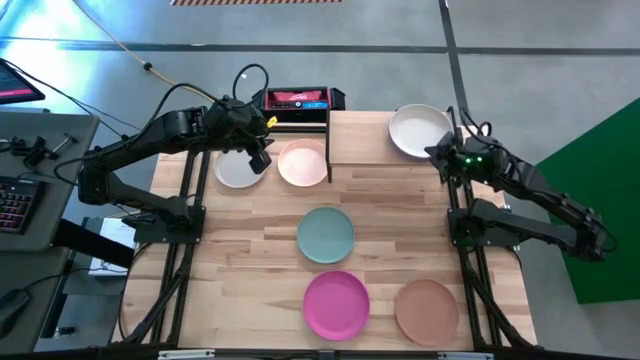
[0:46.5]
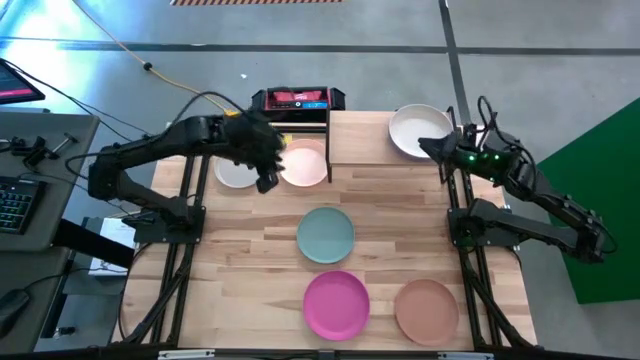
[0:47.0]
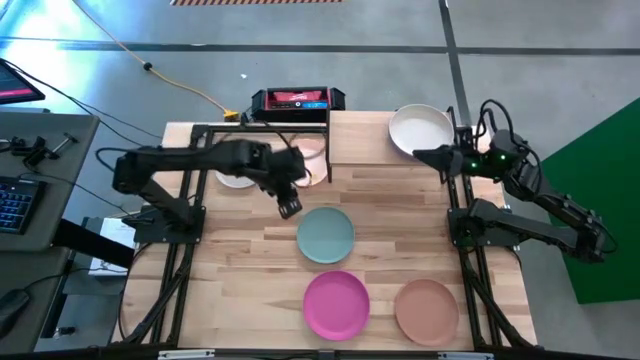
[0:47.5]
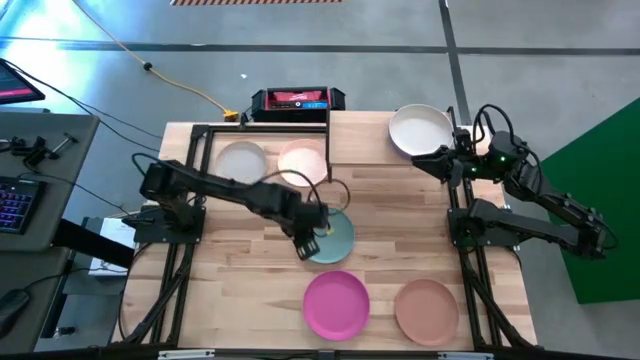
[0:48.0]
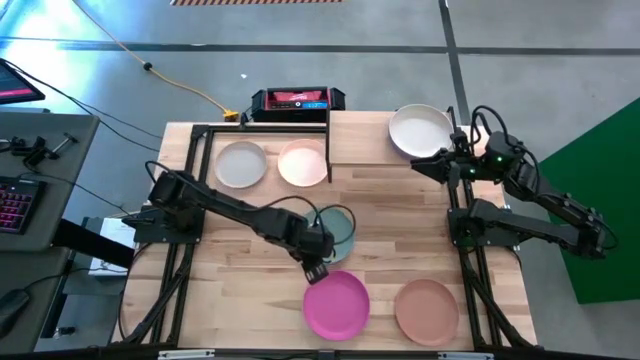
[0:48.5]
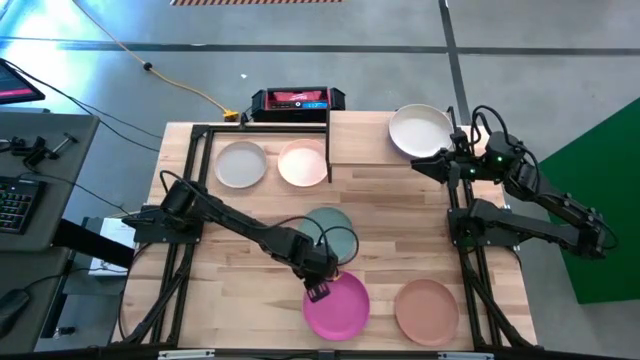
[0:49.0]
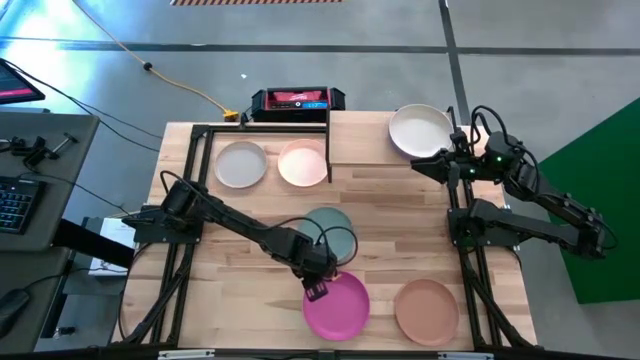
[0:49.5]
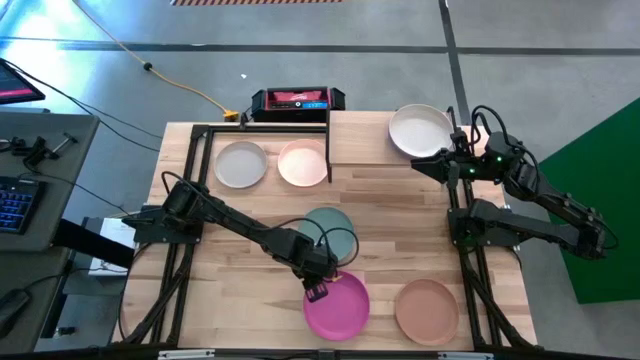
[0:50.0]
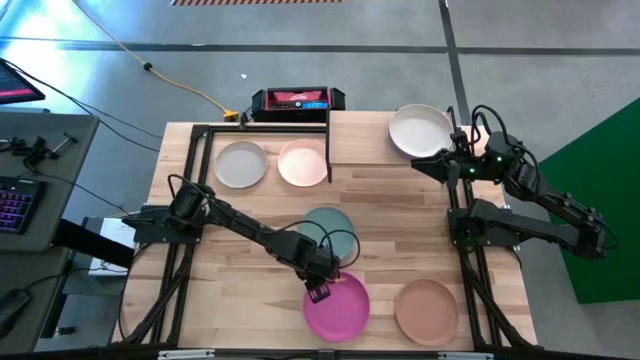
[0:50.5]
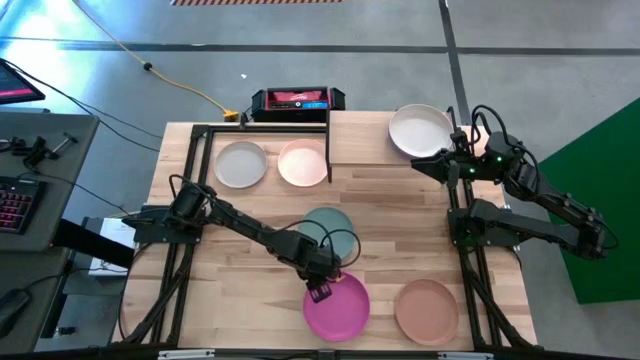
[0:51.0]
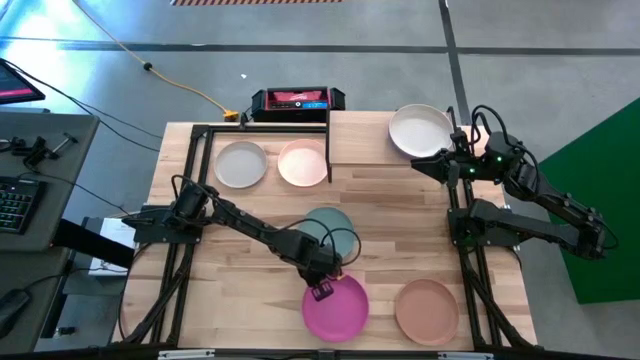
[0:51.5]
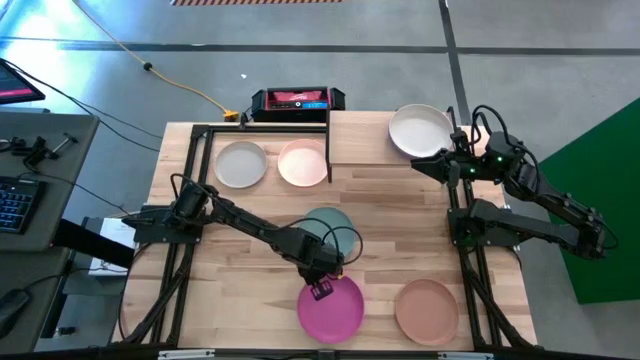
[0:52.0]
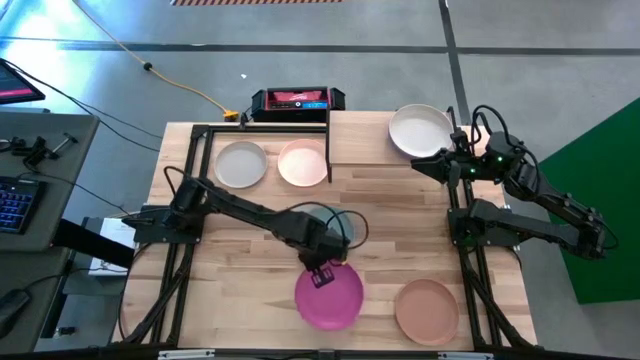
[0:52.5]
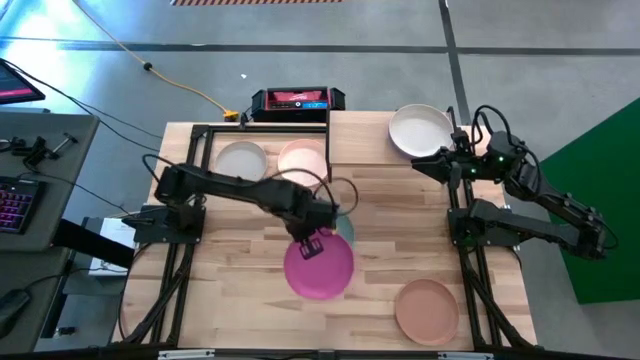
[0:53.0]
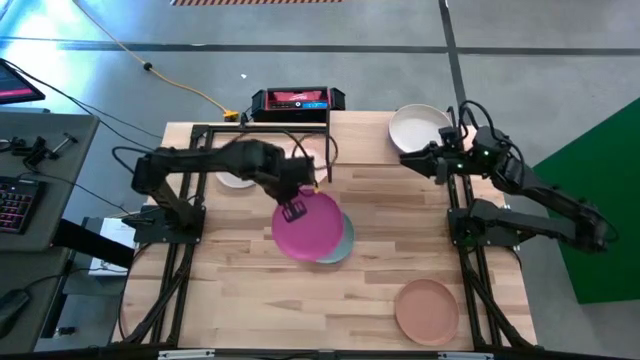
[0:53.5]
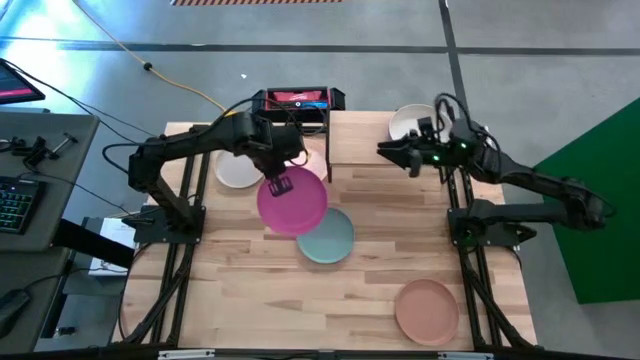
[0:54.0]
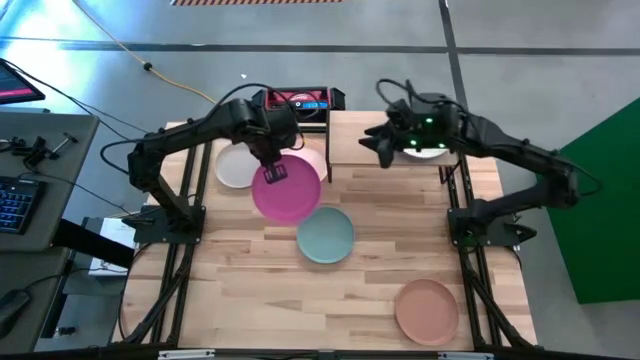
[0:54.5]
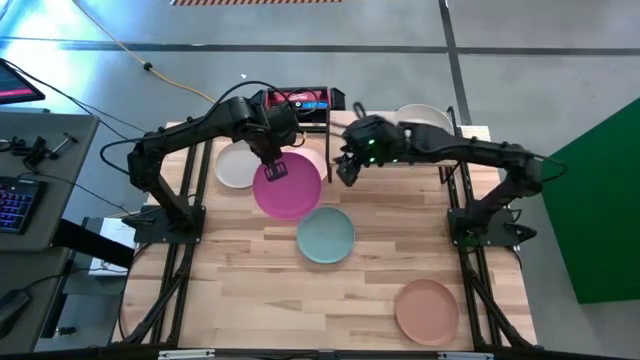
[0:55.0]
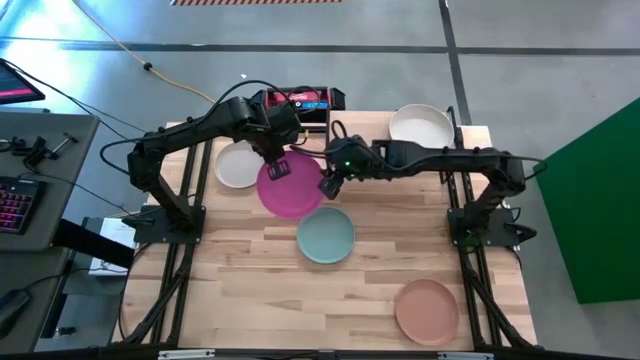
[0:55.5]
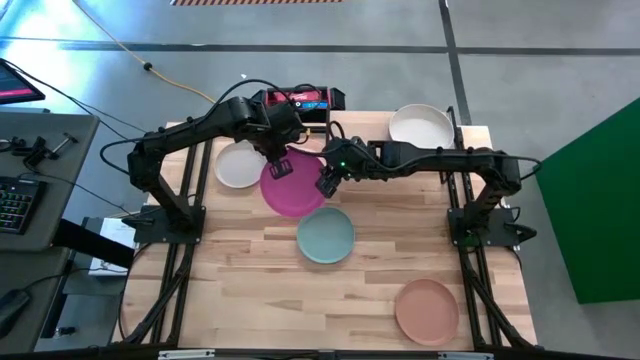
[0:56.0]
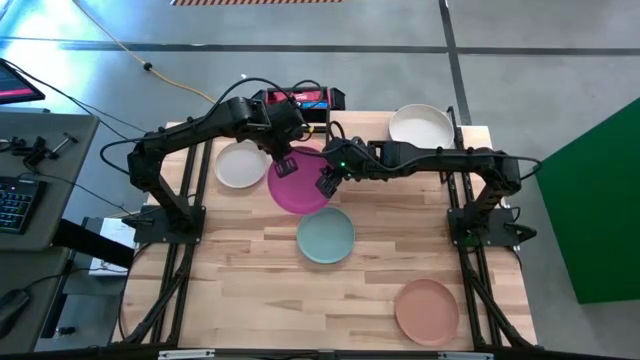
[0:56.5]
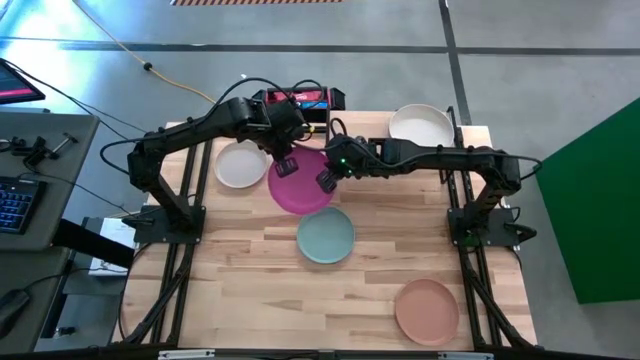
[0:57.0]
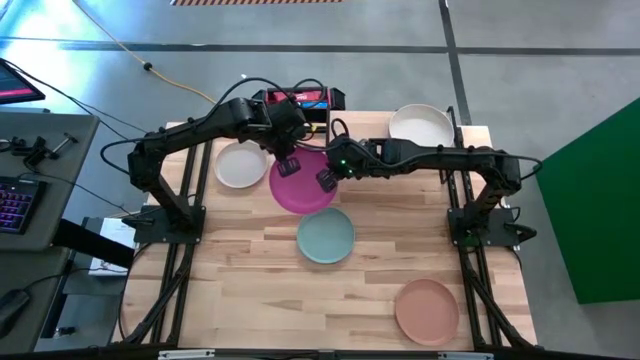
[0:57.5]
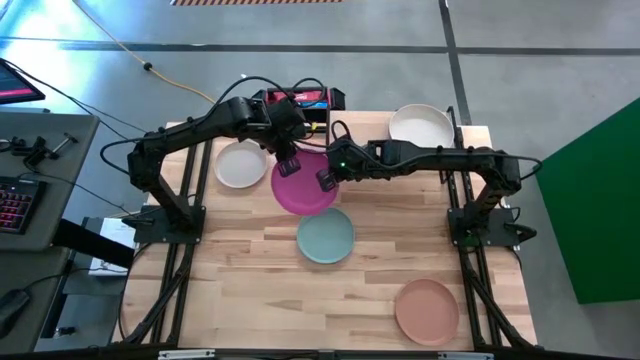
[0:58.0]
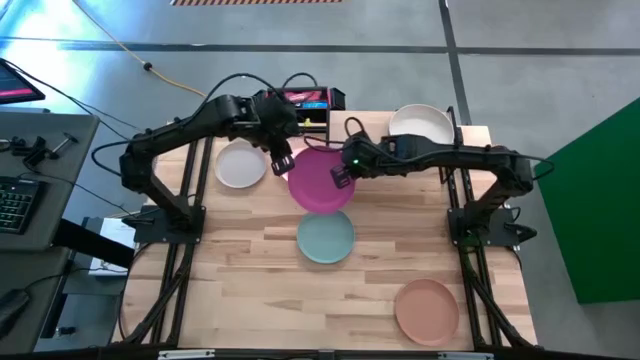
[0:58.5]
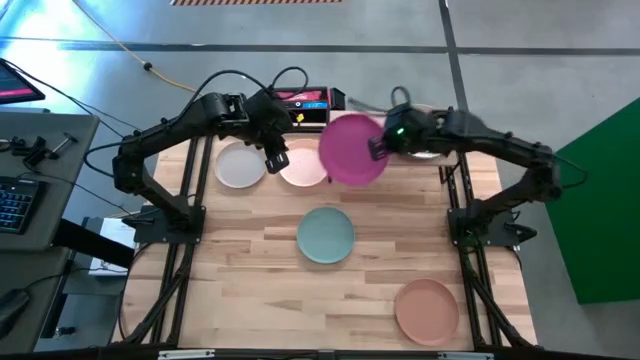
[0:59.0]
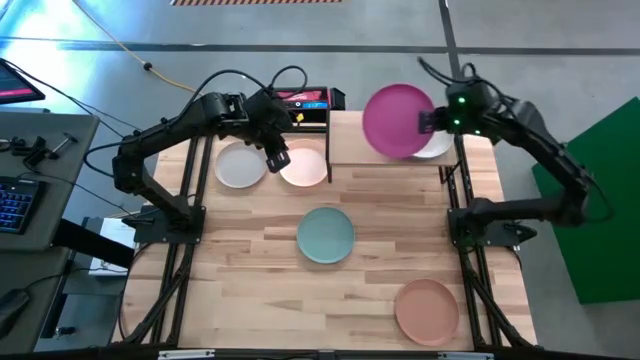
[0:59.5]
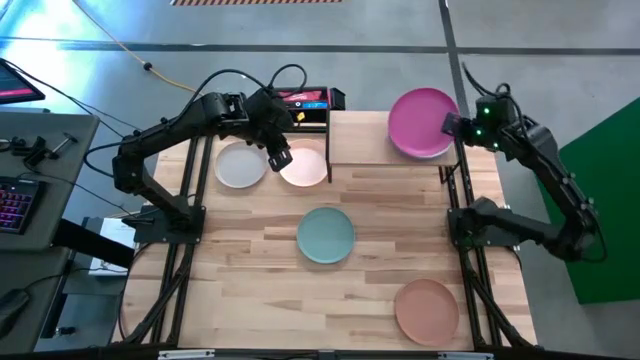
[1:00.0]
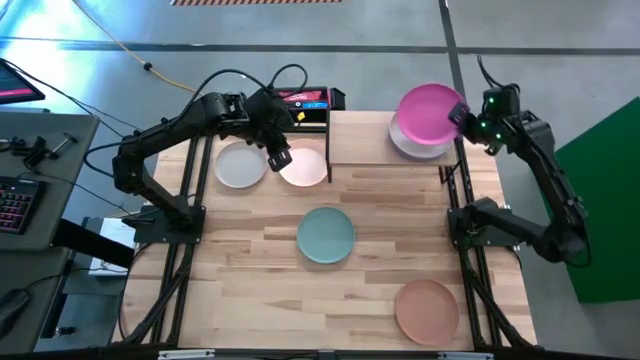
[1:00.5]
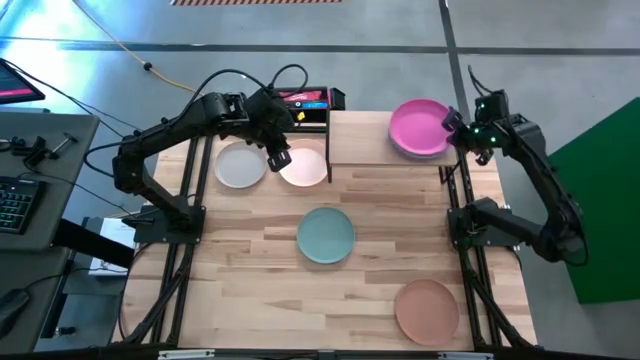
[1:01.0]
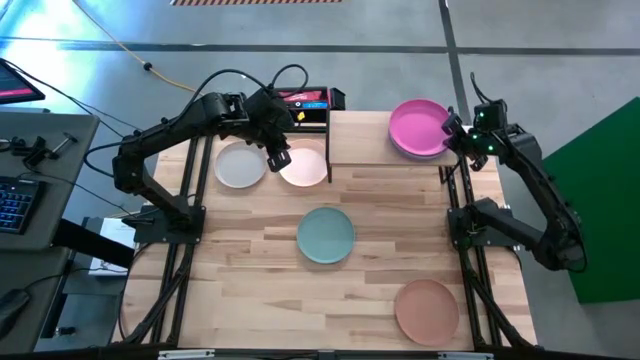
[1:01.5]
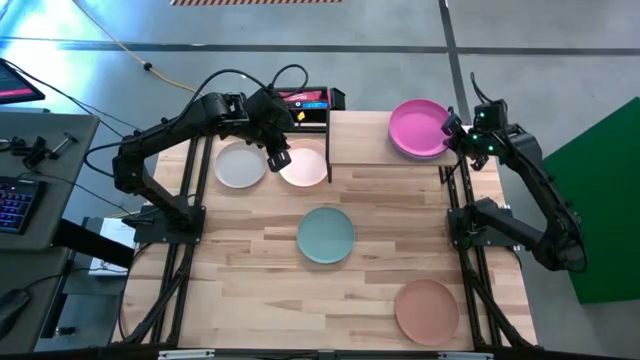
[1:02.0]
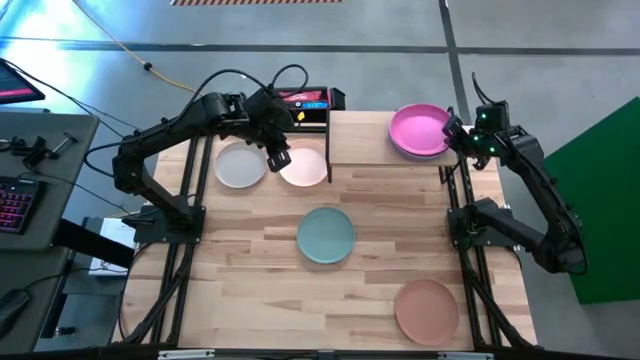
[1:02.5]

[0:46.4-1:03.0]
Task: Place and stack plates onto a shelf
Stack the pink plate on the light gray plate on the shelf

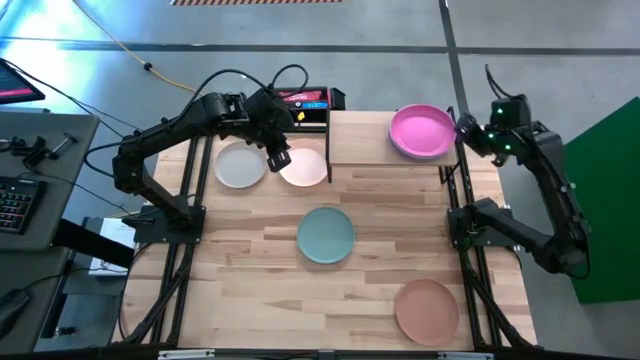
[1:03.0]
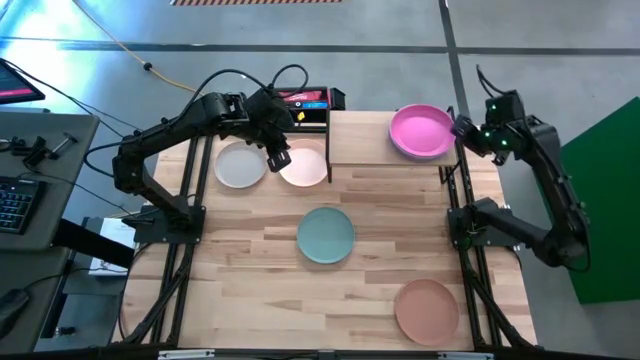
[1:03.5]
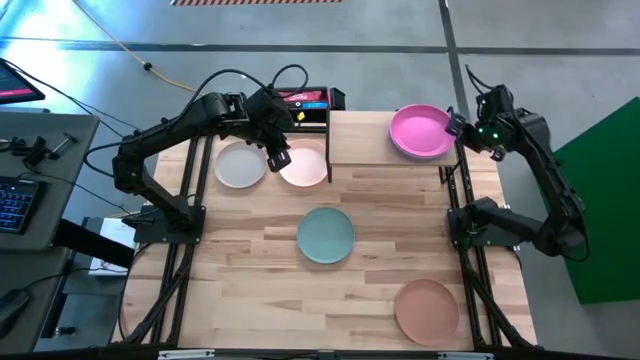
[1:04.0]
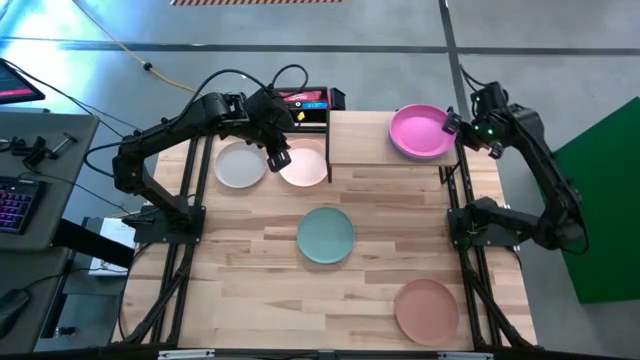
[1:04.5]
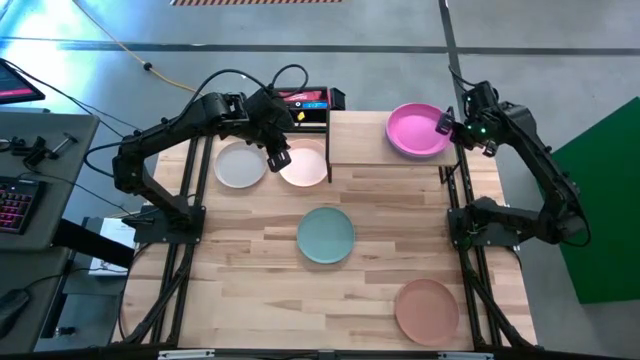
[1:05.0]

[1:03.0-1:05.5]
Adjust the stack of plates on the shelf

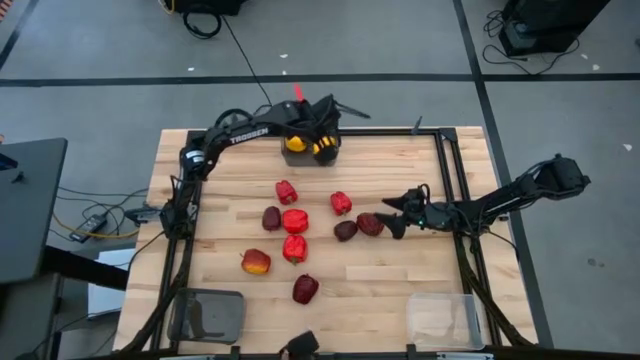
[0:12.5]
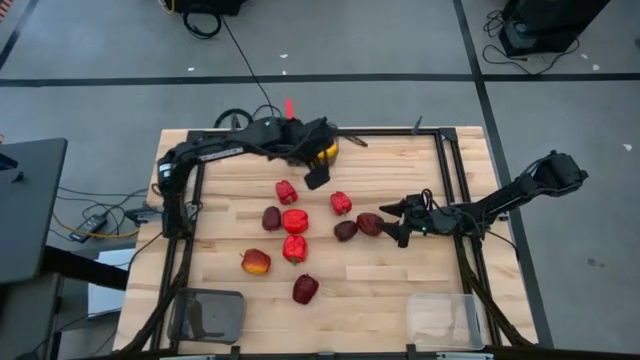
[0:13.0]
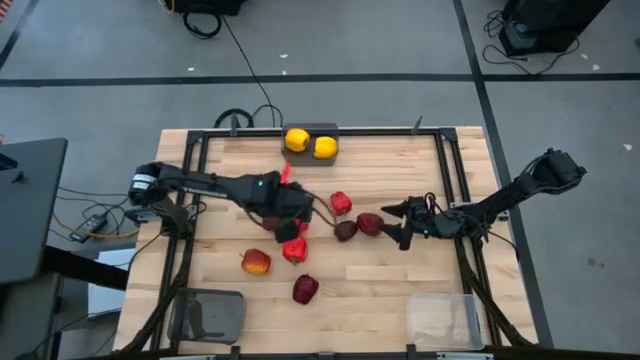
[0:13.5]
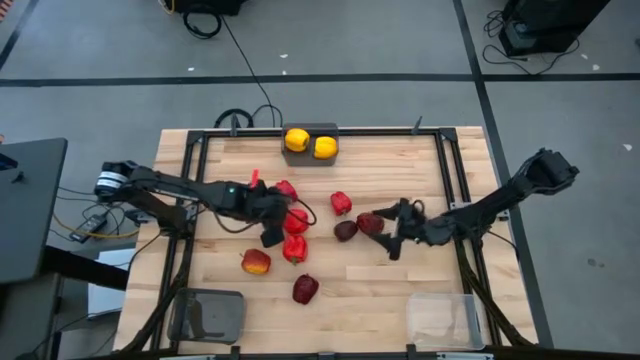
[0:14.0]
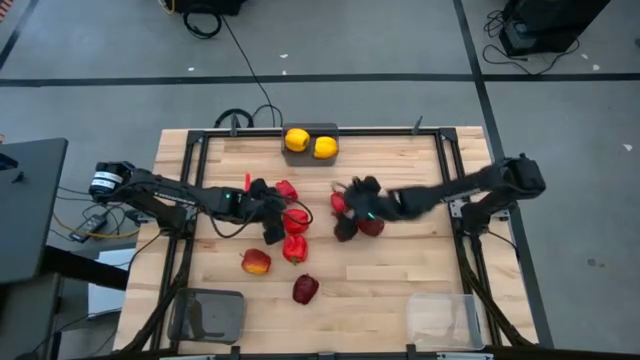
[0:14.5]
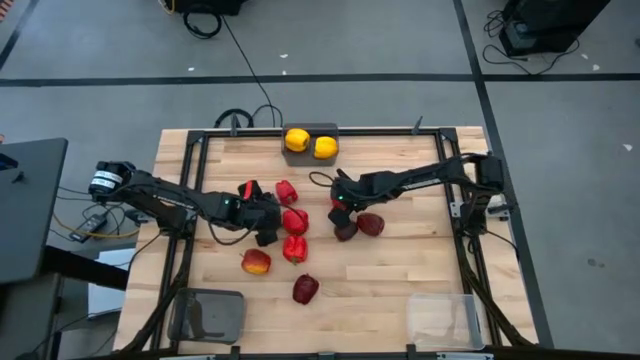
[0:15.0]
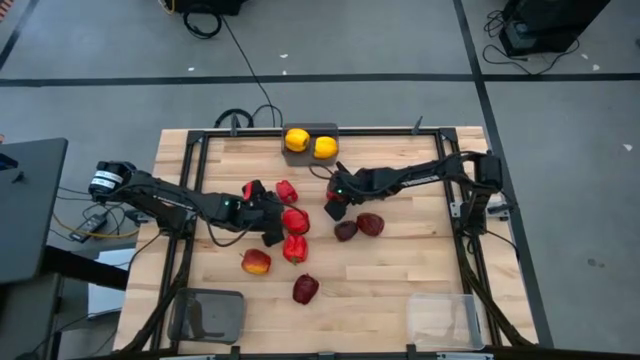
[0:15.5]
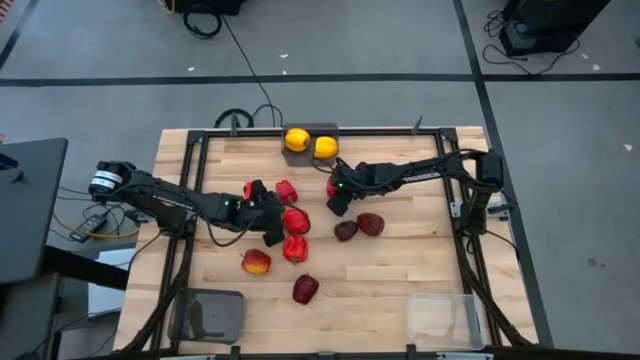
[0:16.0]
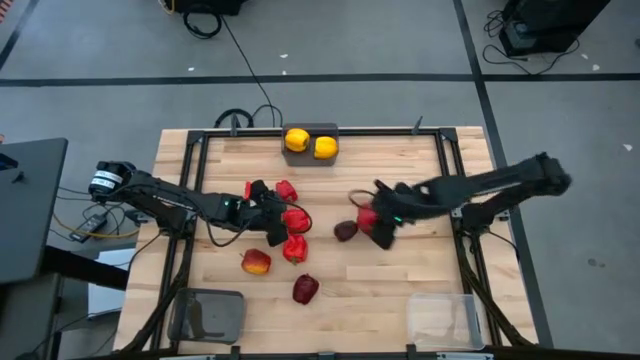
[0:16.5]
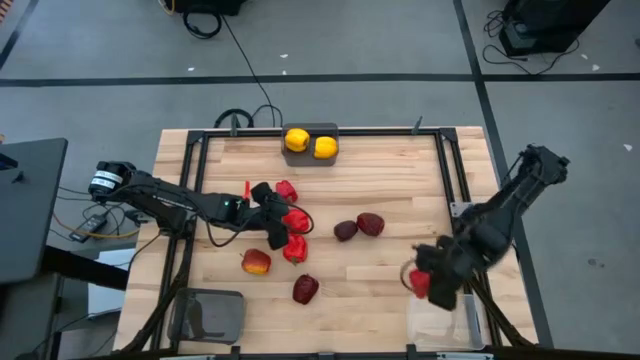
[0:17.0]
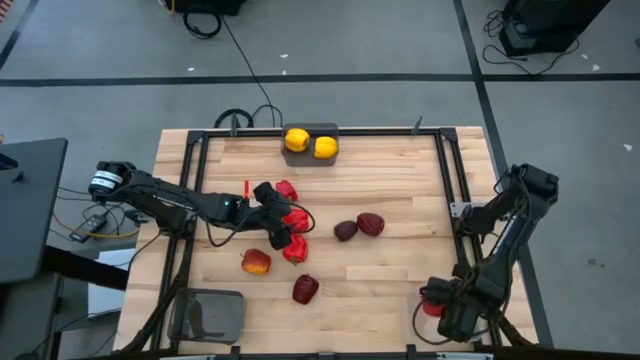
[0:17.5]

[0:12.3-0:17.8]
Task: Sort produce into baskets
Put the red bell pepper into the transparent bin
